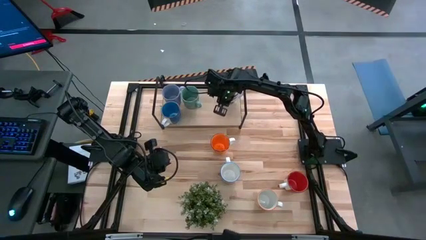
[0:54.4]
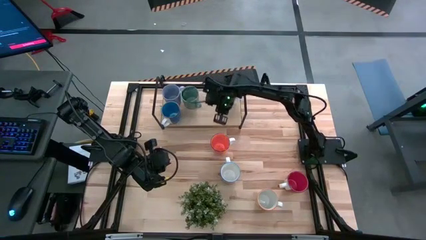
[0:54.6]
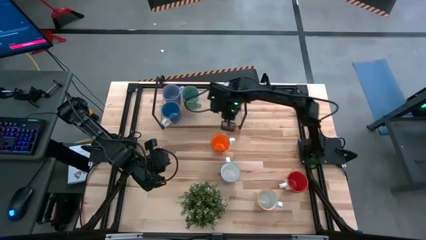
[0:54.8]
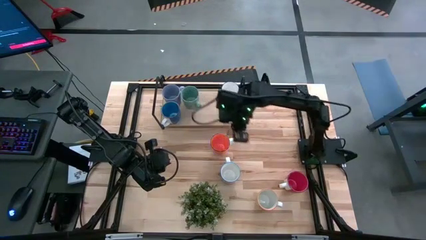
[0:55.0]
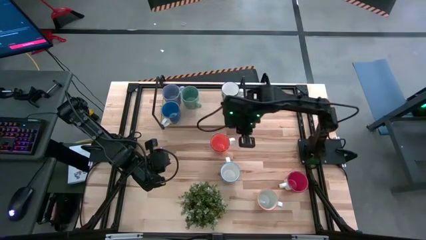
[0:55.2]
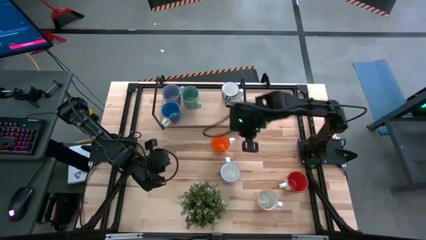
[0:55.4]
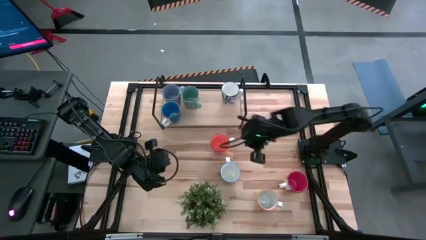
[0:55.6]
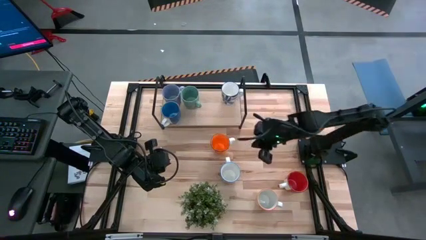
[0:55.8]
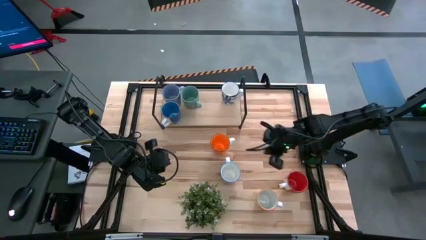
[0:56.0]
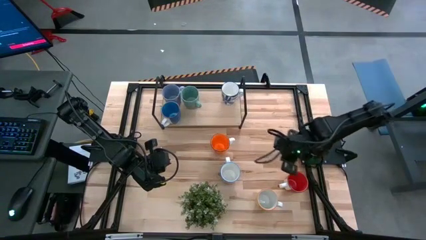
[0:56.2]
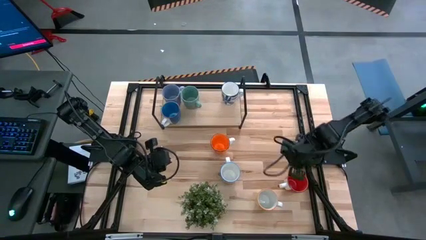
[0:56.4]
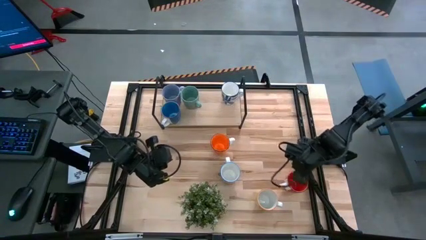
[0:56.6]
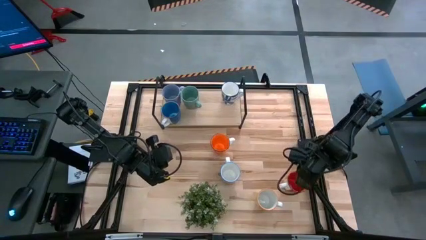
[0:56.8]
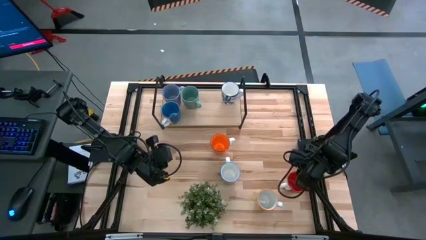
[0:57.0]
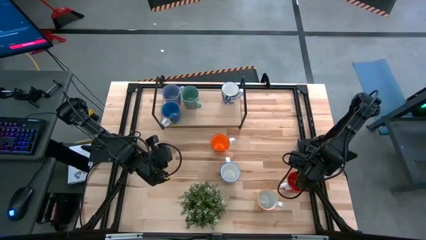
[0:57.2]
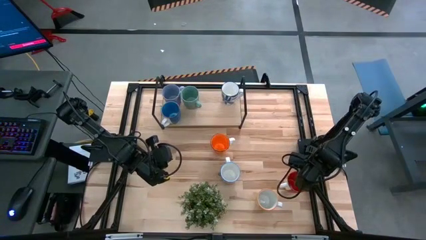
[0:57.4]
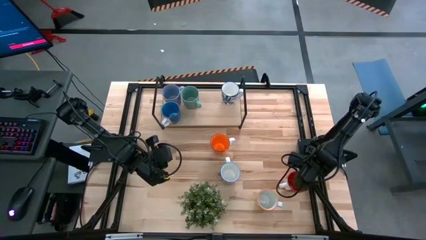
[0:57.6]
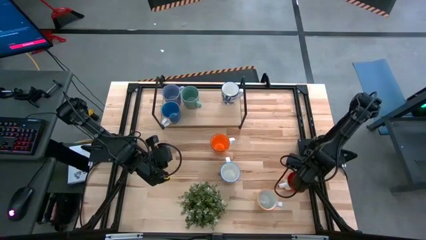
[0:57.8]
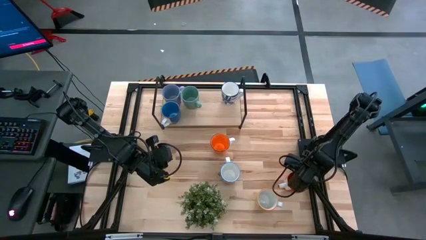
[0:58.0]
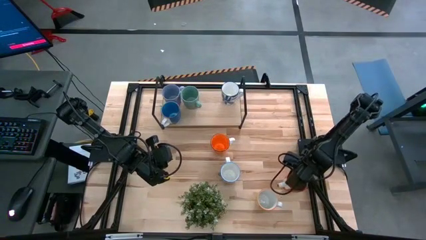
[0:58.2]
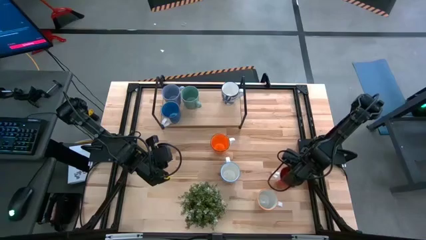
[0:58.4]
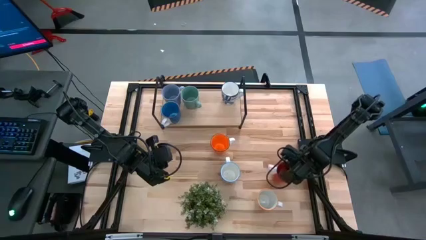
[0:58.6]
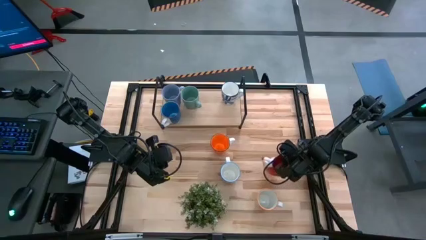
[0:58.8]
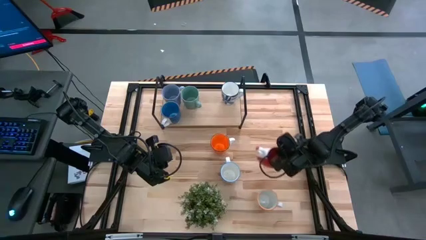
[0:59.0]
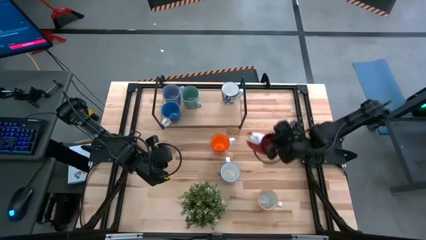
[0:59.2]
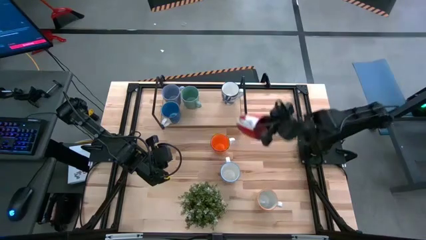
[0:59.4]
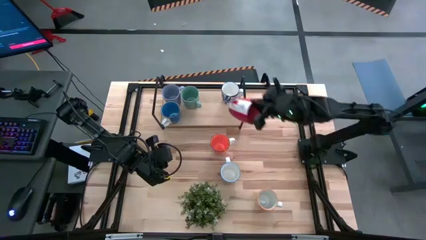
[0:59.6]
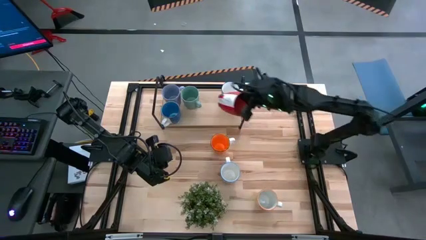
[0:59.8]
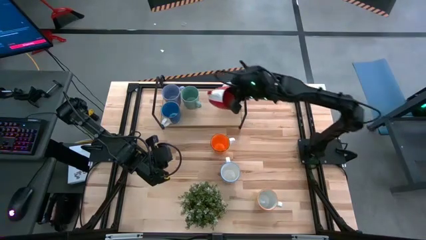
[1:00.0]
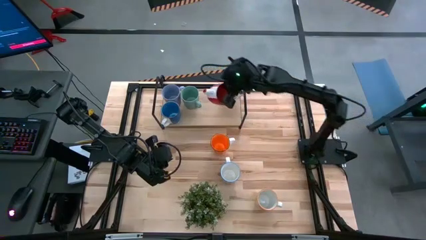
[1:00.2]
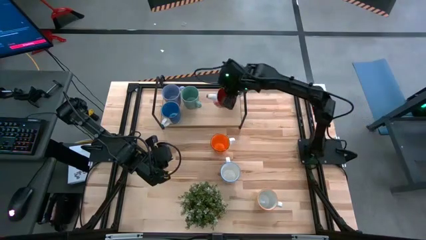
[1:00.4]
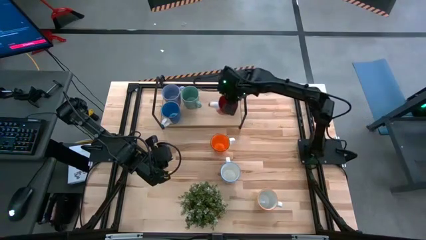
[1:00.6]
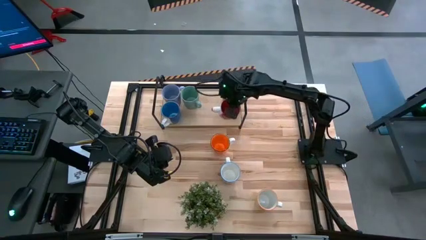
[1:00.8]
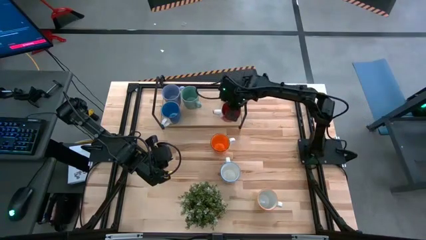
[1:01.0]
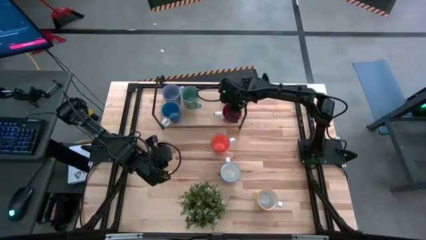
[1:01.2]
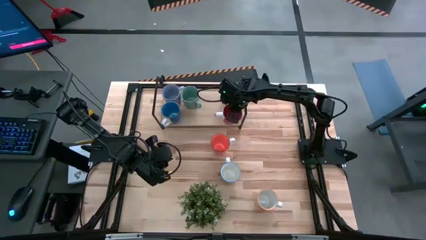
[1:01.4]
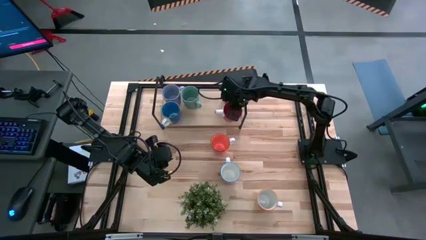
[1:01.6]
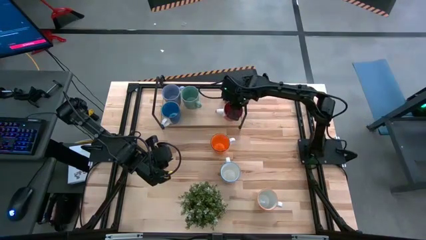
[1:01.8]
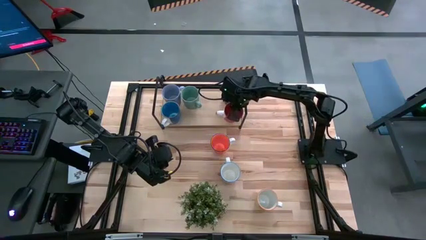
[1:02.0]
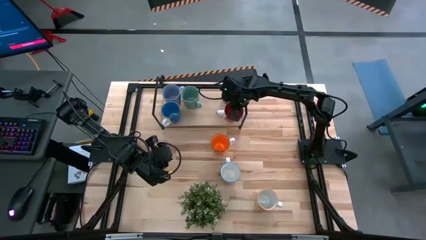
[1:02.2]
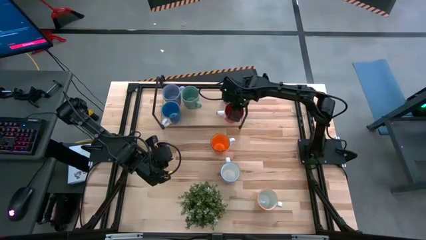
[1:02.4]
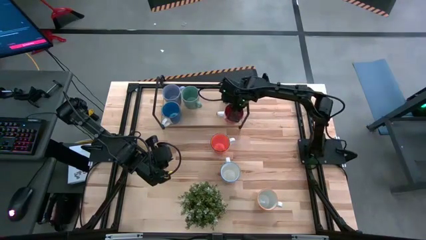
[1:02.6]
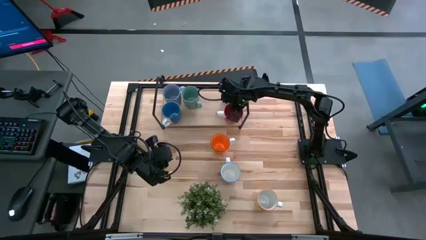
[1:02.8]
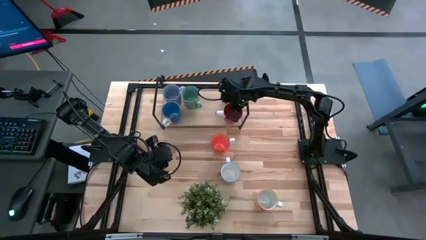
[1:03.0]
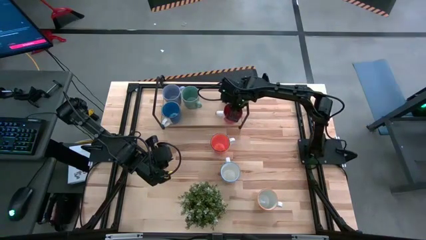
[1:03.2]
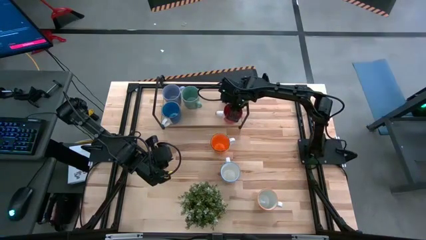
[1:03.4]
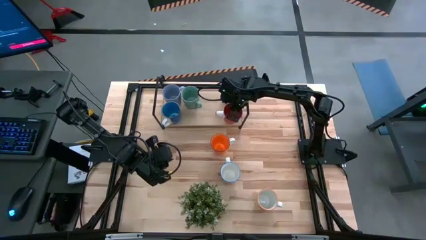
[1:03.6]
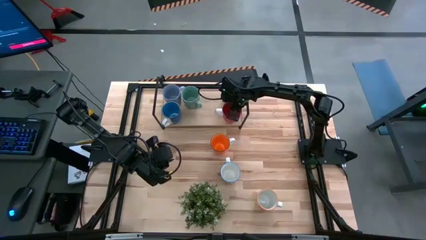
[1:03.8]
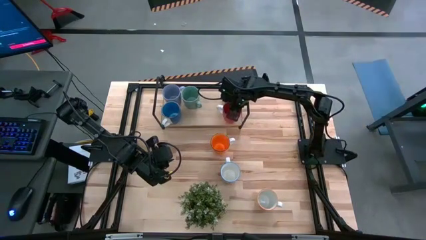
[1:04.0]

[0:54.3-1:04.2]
Task: Place coffee mugs
Put the red mug on the shelf

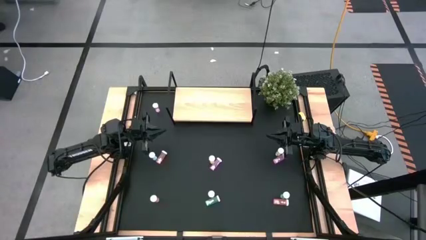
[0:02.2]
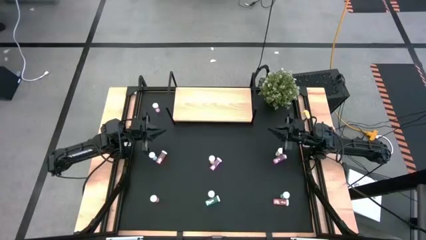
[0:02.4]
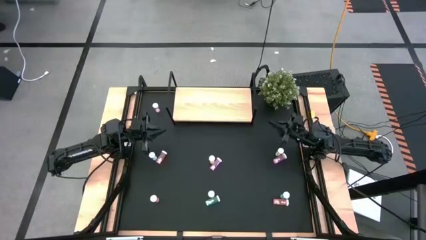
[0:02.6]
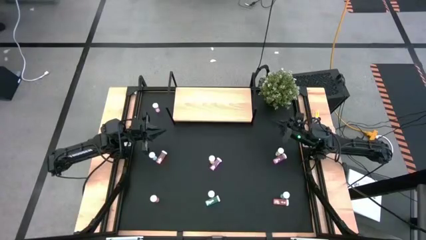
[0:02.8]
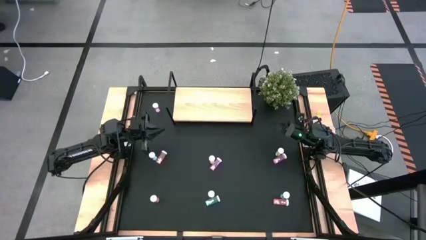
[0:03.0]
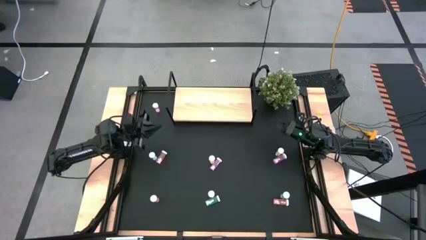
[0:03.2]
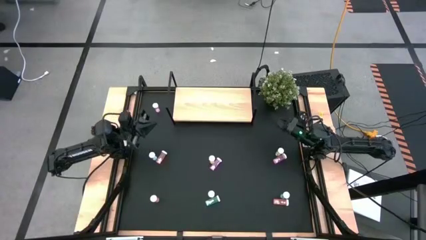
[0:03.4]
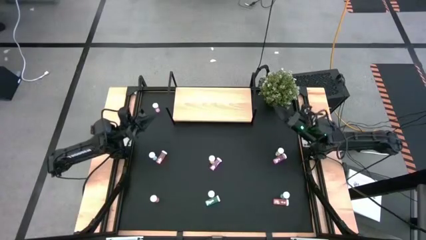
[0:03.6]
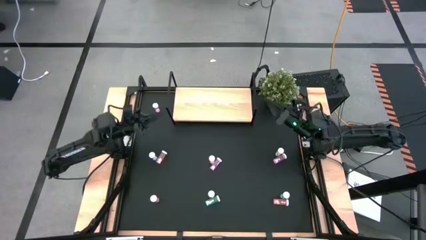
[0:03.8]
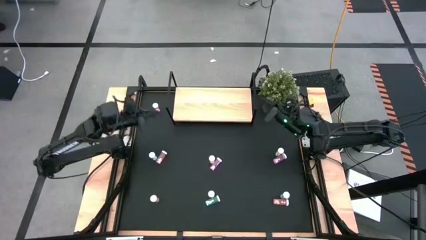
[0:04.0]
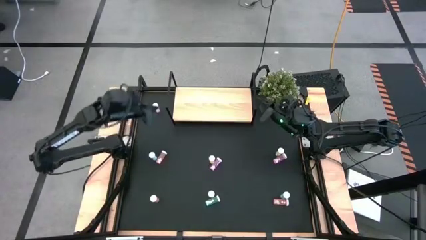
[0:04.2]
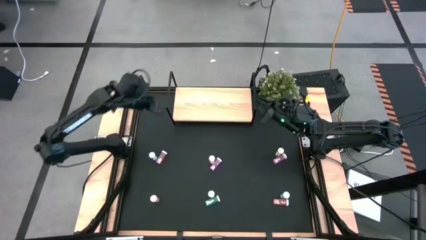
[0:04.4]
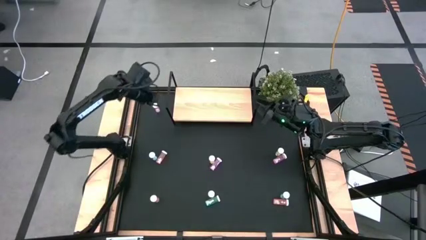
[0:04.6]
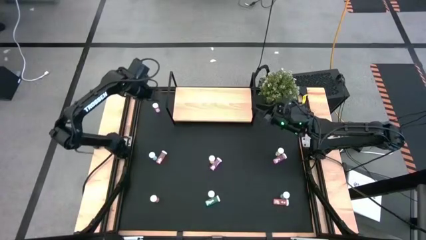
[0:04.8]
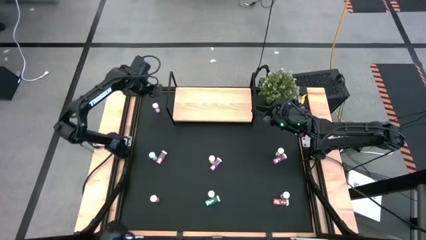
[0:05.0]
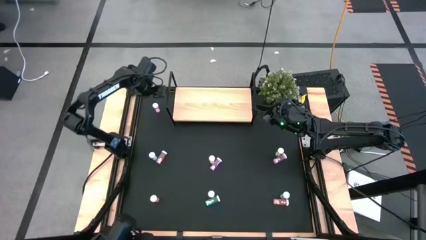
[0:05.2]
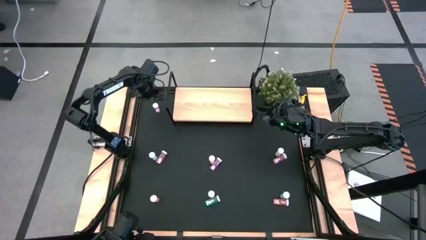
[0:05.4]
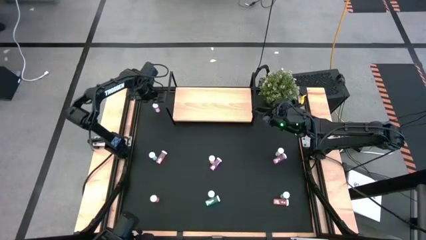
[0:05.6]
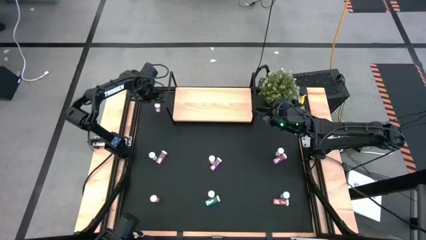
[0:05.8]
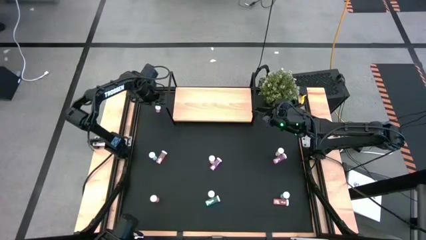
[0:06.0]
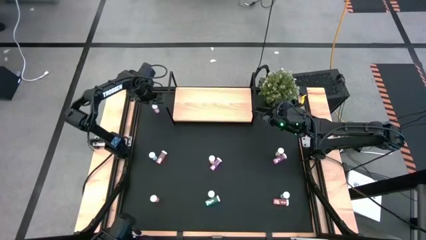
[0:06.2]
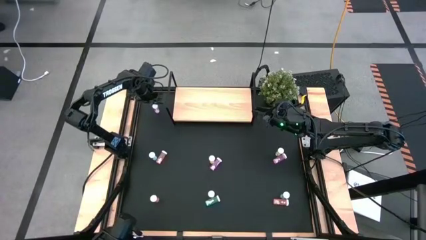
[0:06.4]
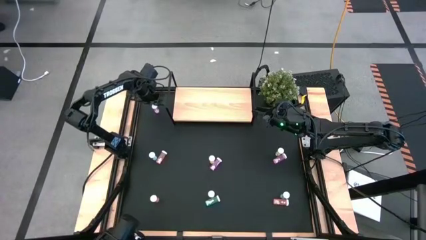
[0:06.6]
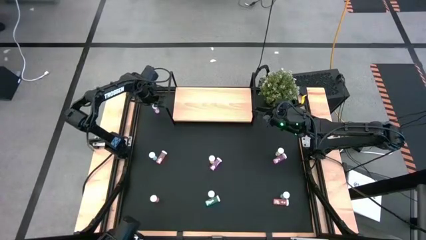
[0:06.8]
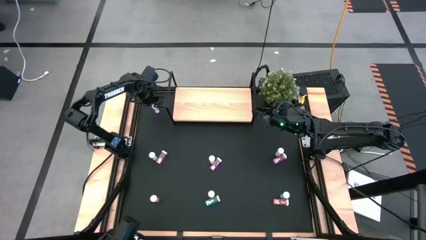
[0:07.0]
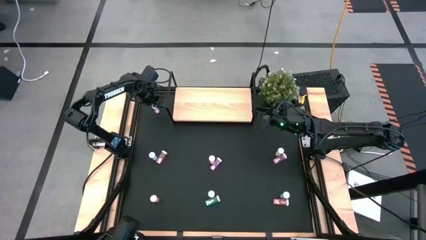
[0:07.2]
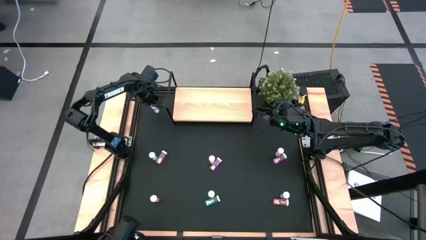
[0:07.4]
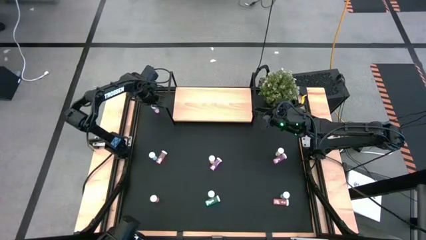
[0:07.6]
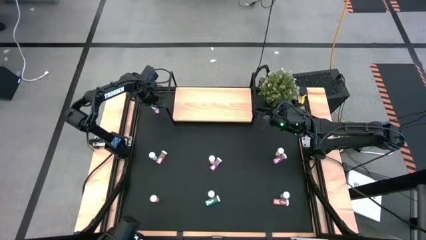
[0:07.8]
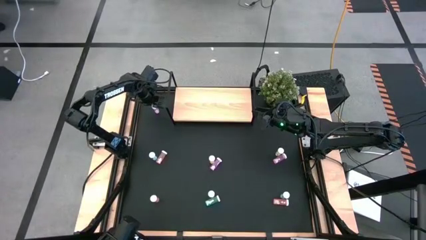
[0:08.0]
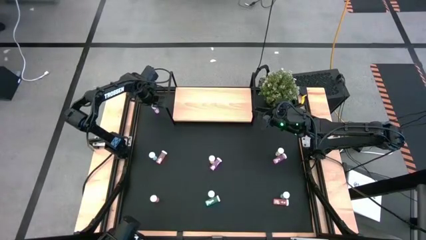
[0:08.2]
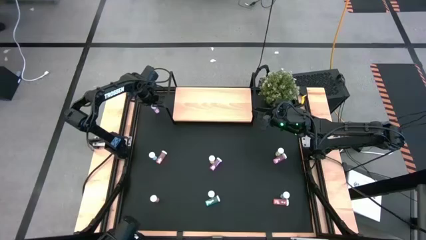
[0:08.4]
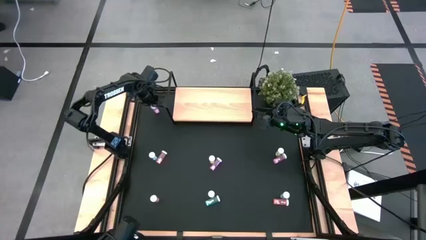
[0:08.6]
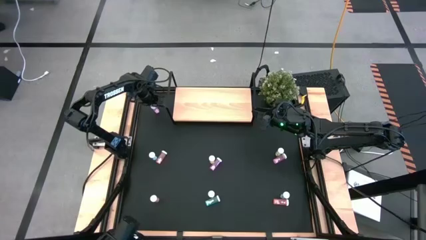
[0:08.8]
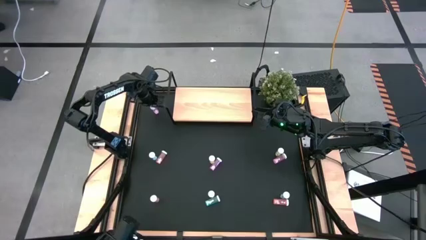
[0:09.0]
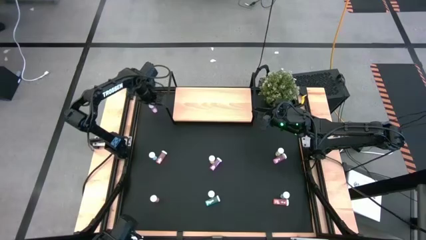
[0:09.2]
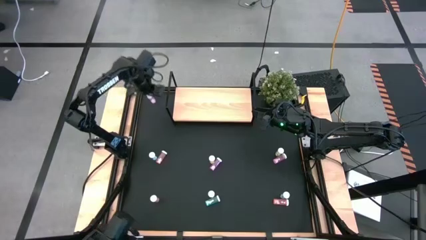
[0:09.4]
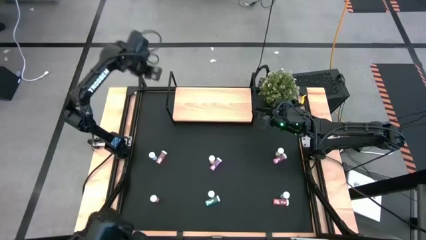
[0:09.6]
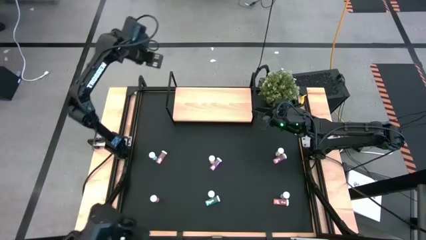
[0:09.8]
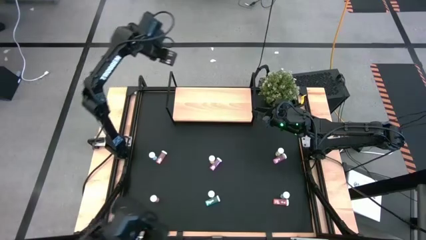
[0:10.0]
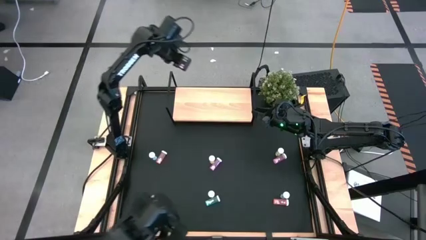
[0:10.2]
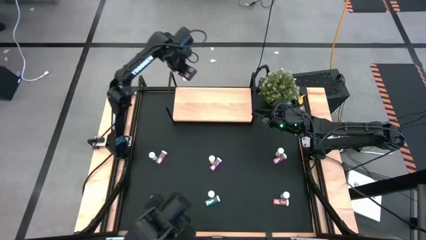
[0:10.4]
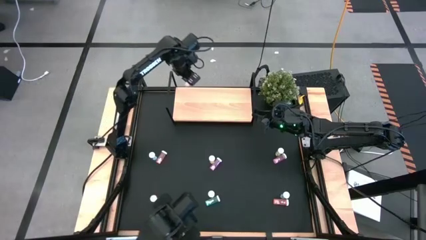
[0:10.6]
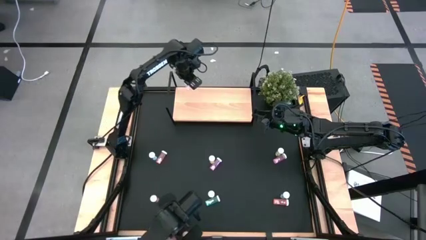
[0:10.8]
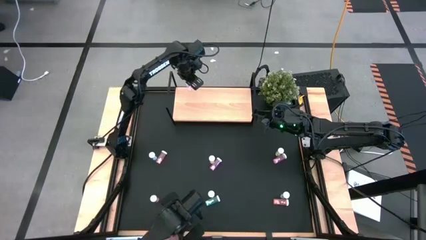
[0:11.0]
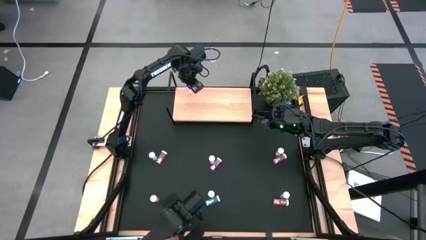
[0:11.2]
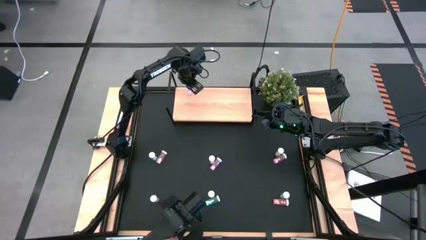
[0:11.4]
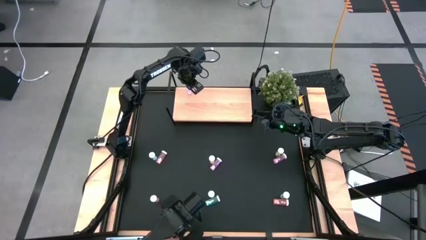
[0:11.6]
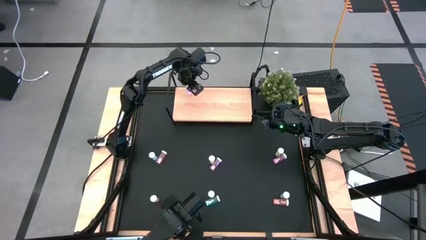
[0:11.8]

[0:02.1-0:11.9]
Task: Pick and place medicine bottles onto shelf by color
Put the top left pink medicine bottle on the shelf
